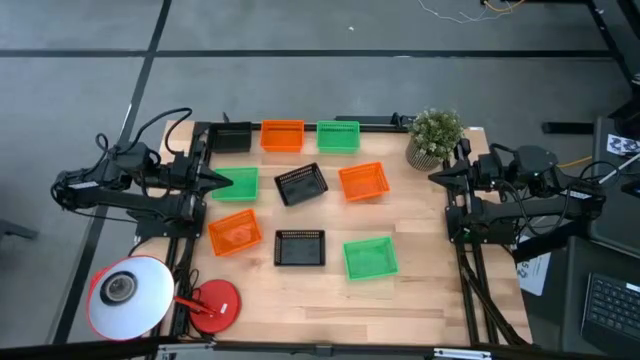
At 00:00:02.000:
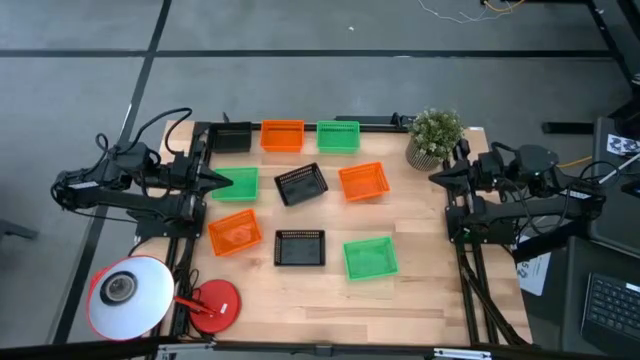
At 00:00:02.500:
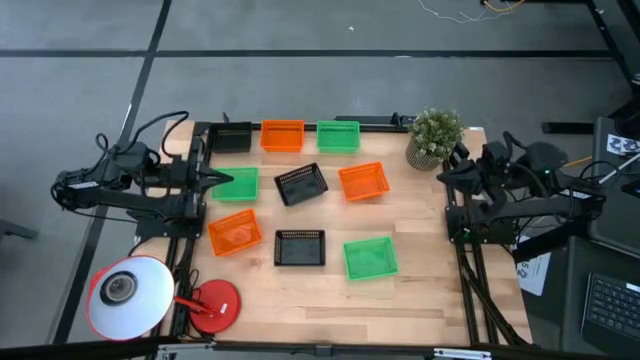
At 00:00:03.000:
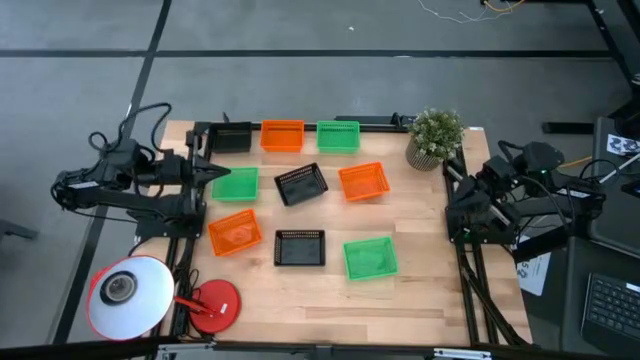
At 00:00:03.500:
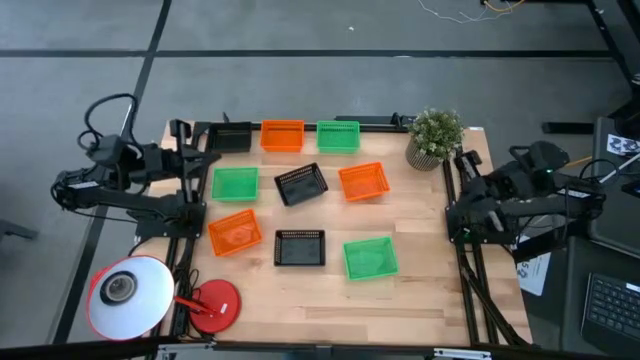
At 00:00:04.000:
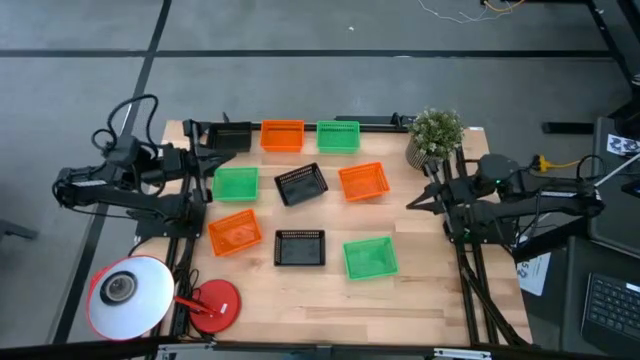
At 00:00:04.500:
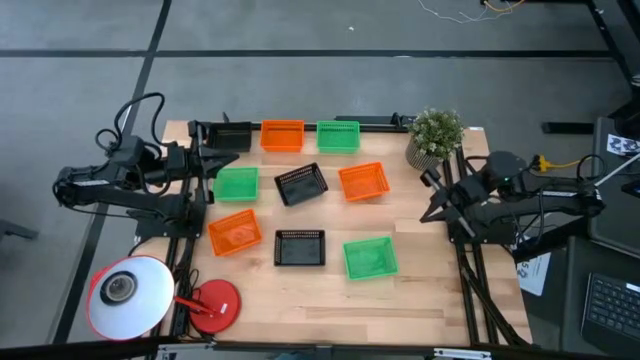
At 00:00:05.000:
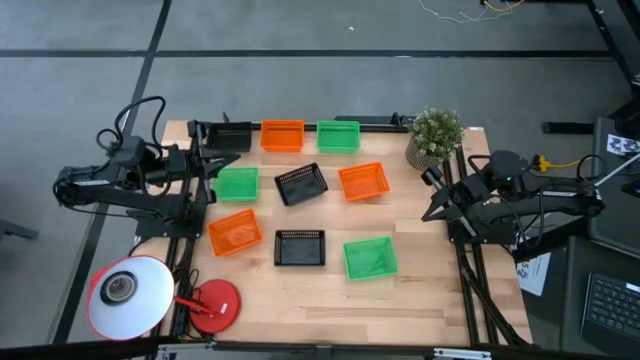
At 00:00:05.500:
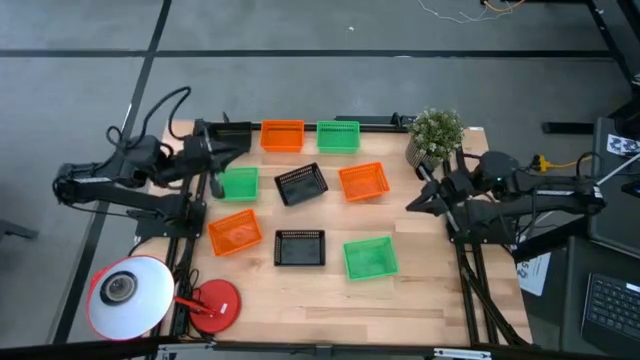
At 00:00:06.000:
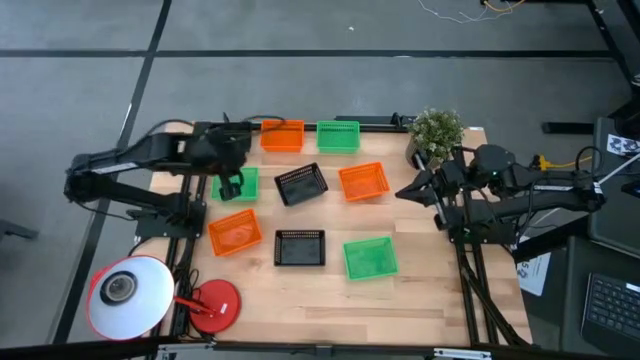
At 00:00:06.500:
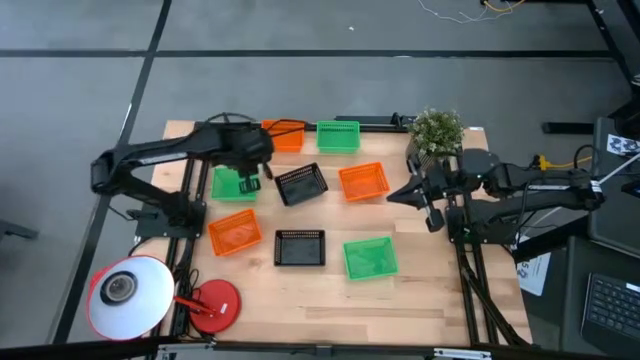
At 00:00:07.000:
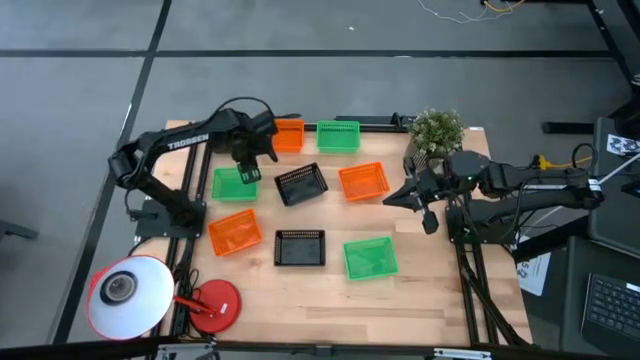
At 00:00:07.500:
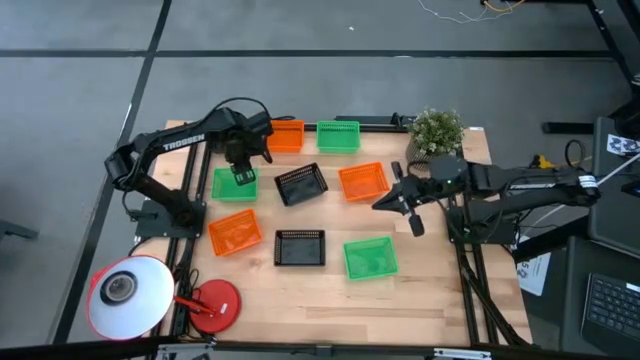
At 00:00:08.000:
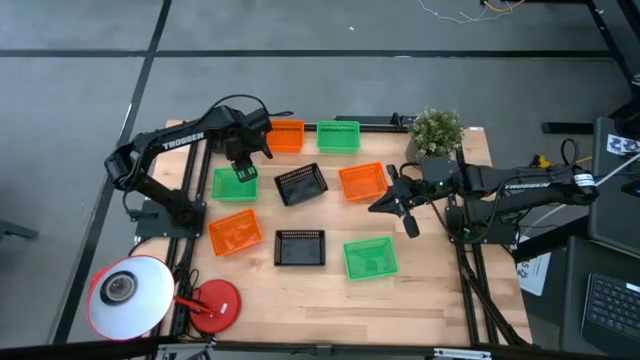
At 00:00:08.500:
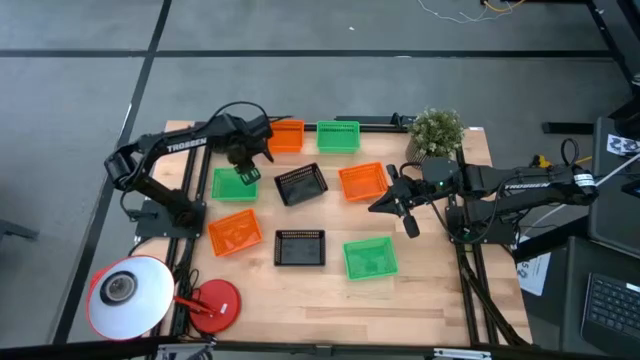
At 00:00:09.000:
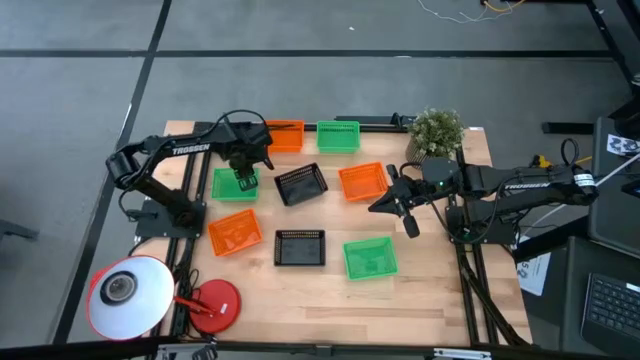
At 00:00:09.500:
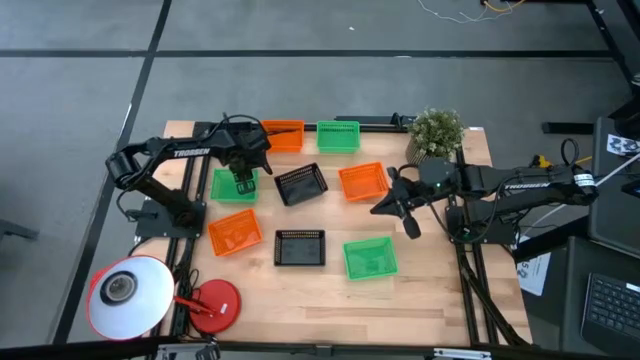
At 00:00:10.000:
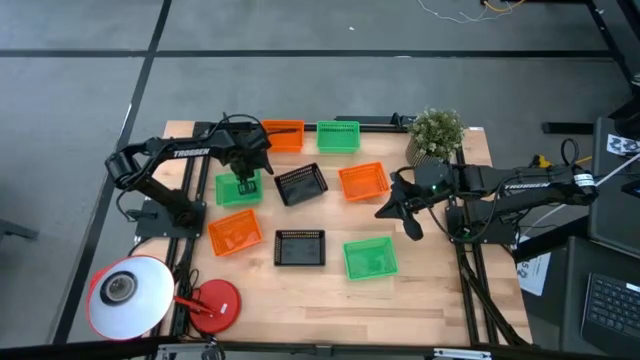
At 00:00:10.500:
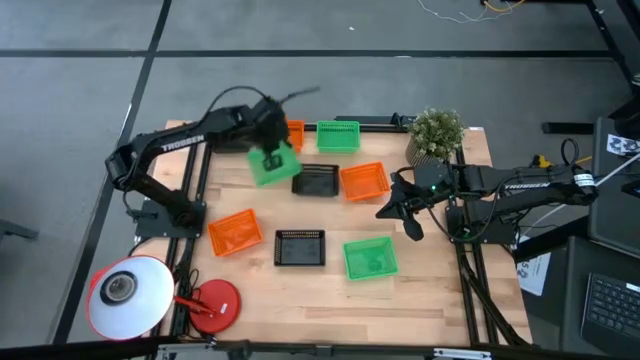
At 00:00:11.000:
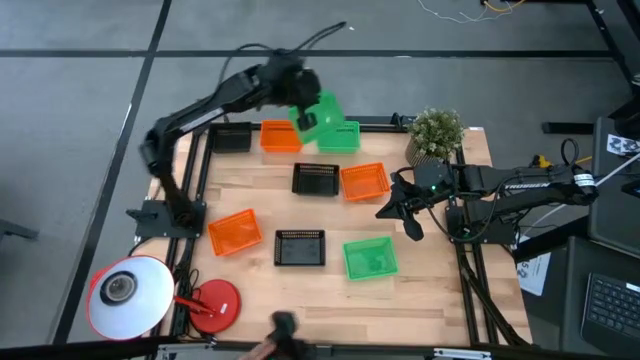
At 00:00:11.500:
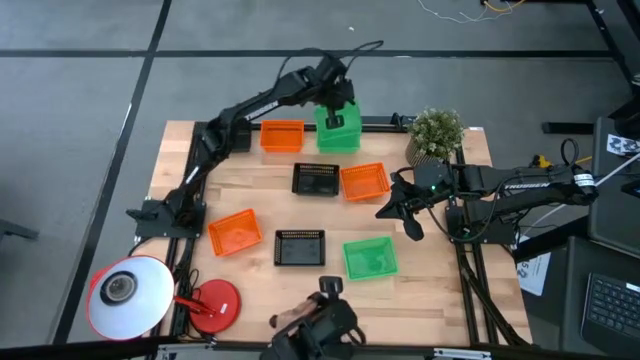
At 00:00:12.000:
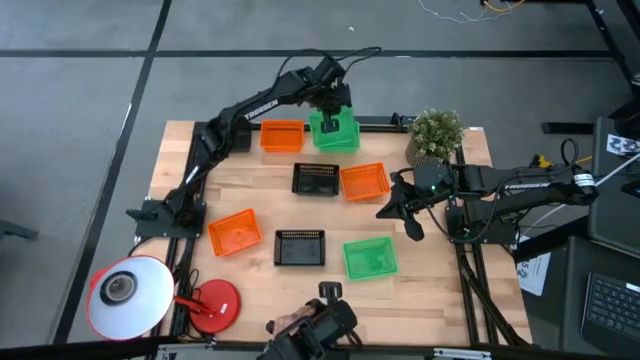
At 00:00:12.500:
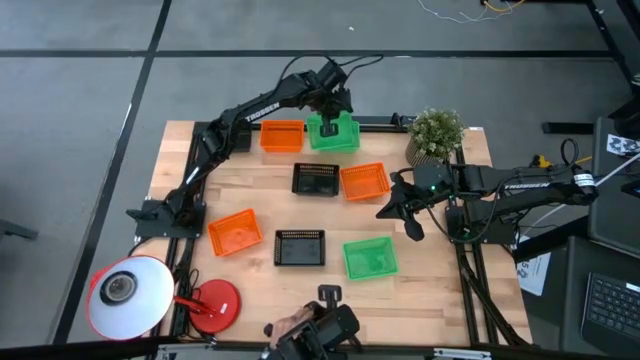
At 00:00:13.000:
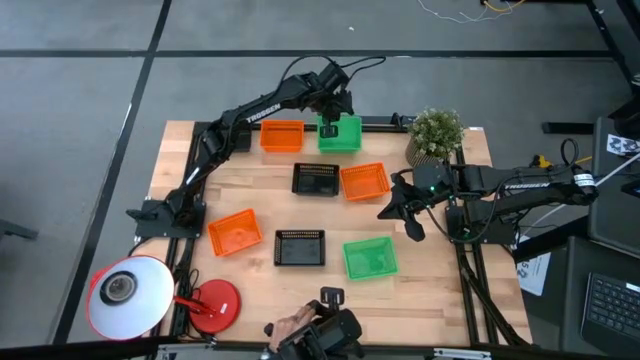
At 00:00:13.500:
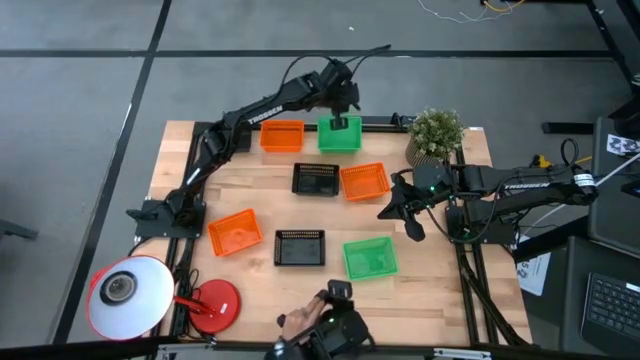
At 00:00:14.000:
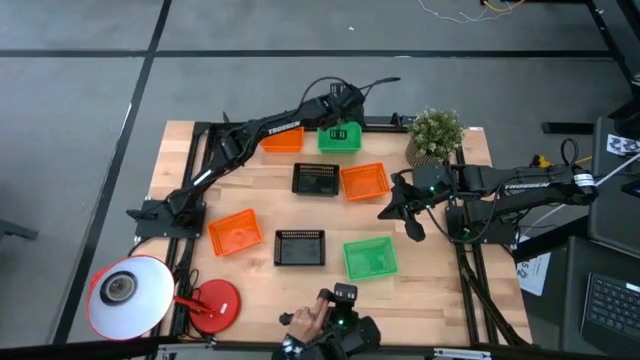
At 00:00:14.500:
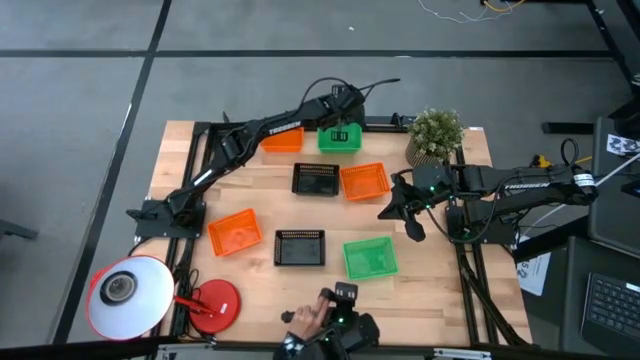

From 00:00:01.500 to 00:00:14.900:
Stack the top green bin on the green bin

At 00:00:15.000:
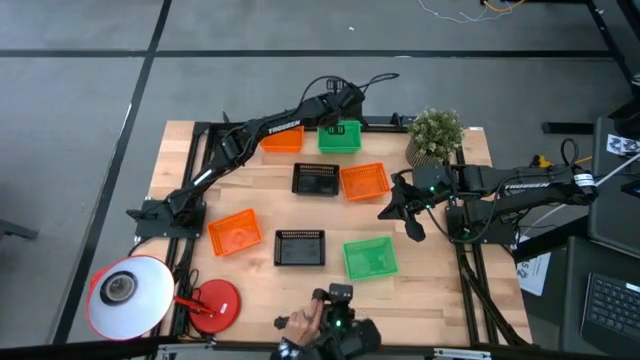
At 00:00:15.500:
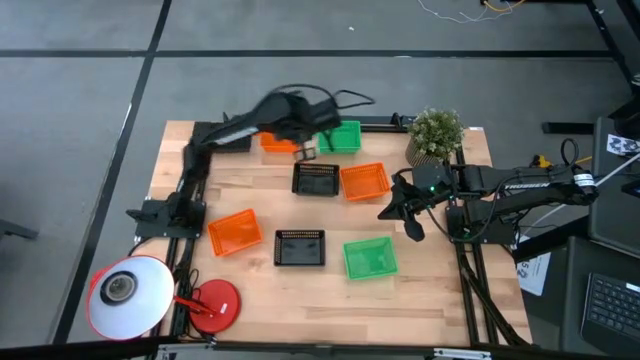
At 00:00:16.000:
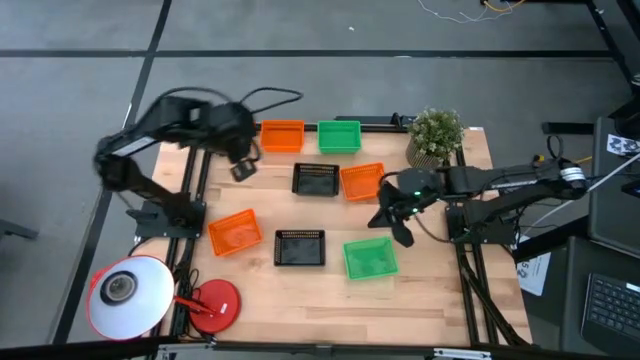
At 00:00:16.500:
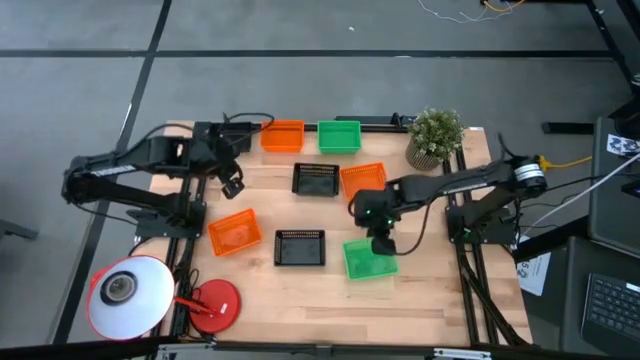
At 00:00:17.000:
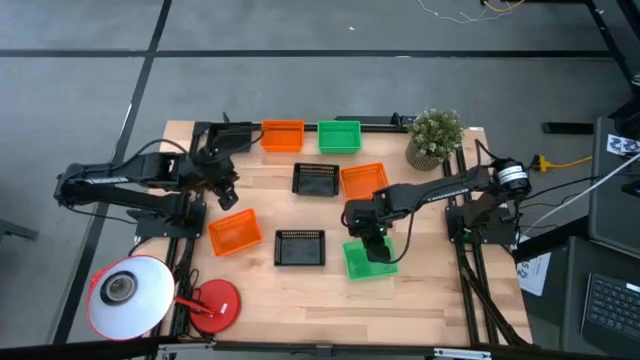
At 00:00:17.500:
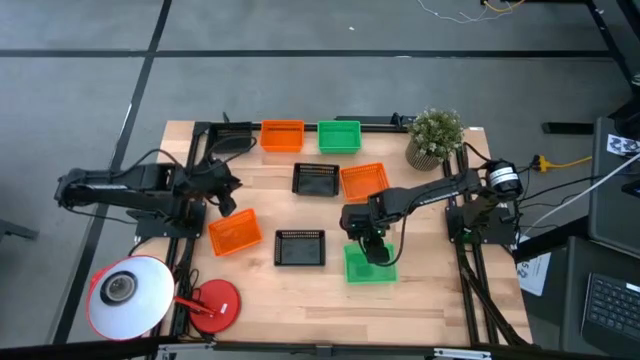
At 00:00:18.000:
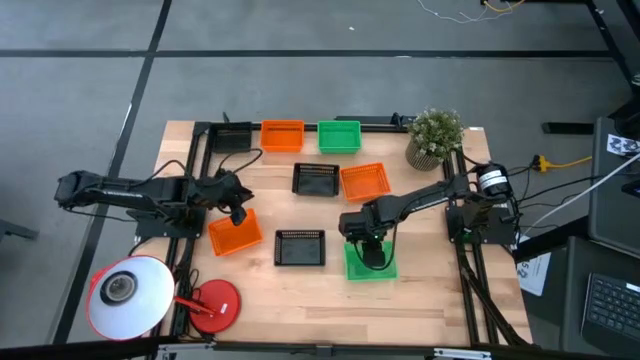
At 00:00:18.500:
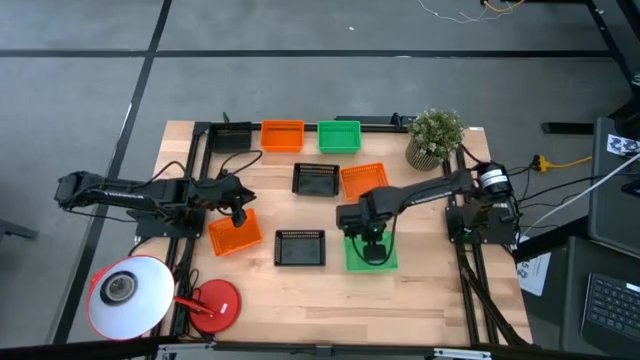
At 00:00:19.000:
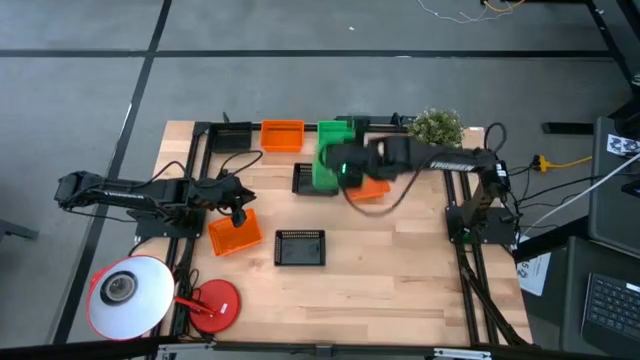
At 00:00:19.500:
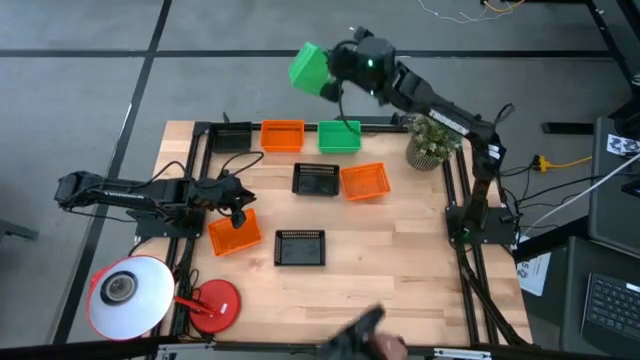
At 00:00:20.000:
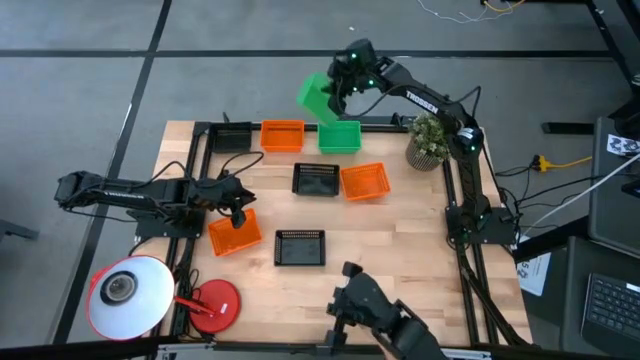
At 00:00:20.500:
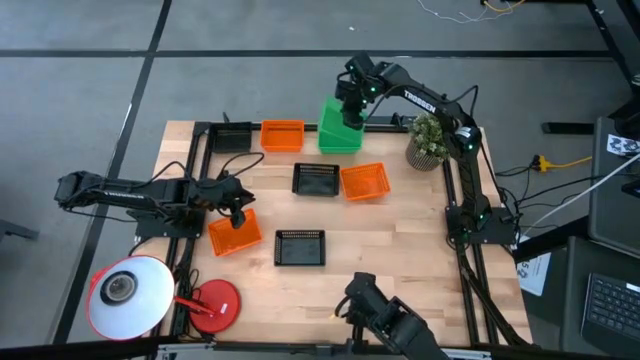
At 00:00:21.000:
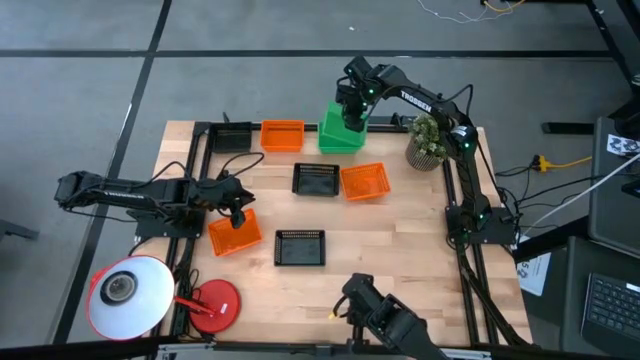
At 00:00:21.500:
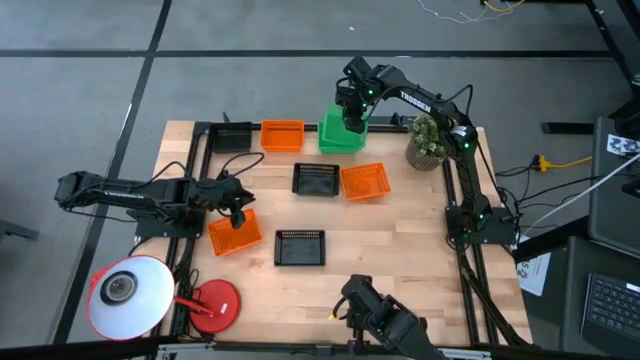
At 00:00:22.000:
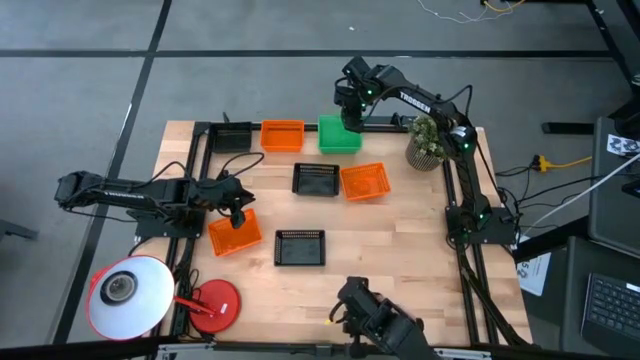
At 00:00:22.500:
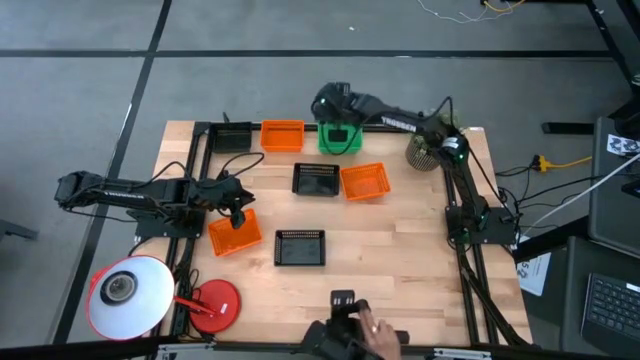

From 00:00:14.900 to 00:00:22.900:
Stack the green bin on the green bin
